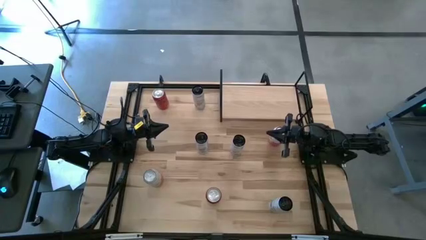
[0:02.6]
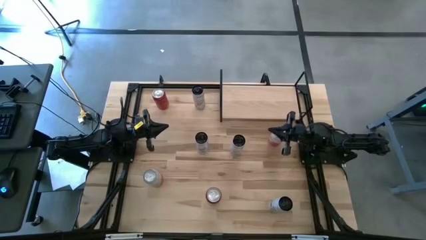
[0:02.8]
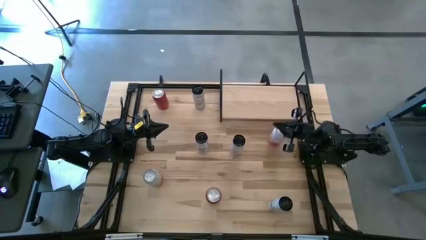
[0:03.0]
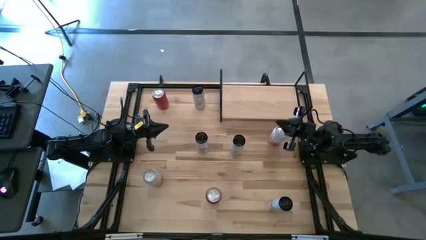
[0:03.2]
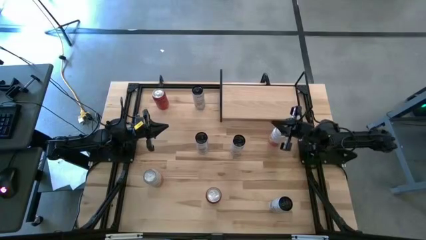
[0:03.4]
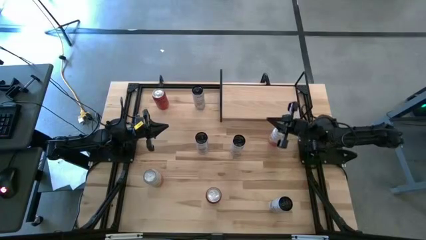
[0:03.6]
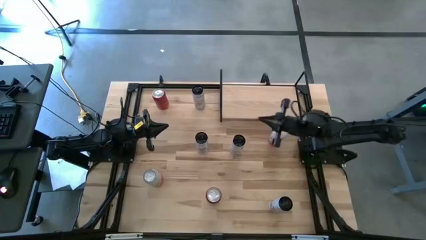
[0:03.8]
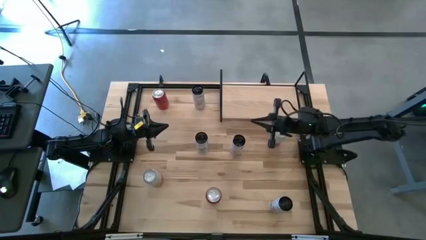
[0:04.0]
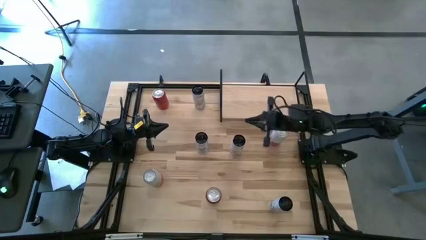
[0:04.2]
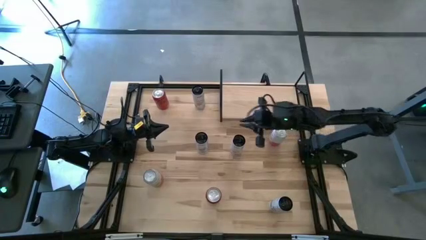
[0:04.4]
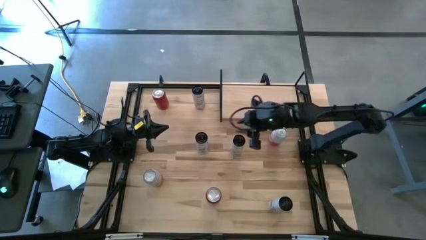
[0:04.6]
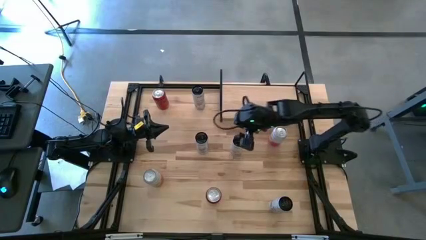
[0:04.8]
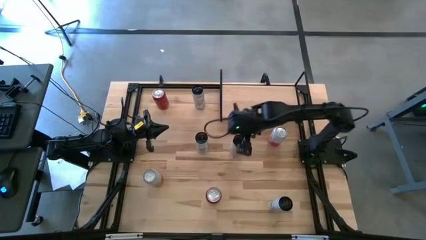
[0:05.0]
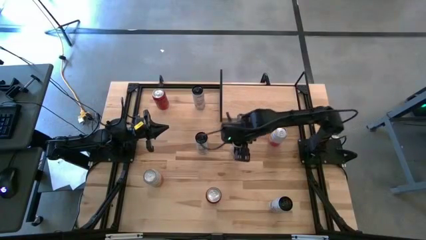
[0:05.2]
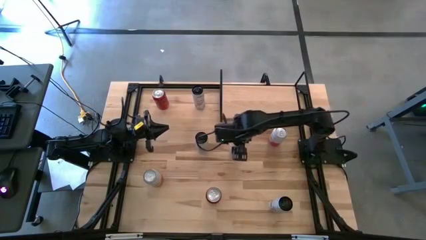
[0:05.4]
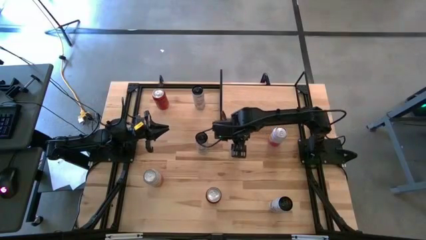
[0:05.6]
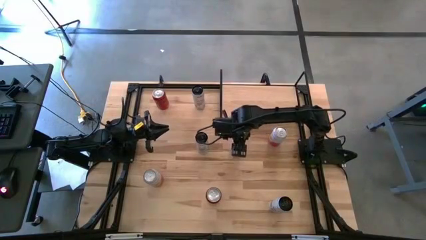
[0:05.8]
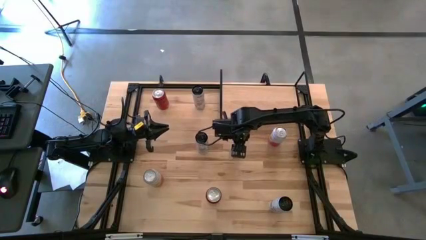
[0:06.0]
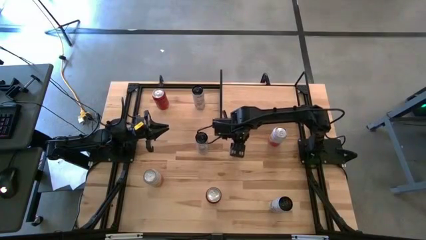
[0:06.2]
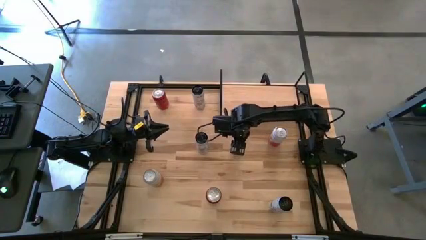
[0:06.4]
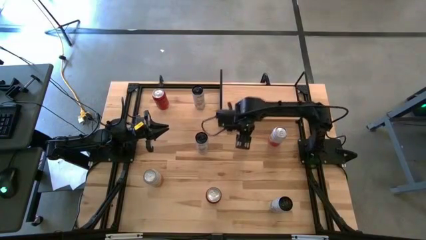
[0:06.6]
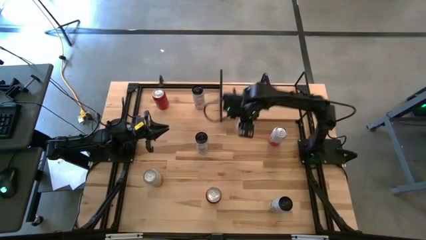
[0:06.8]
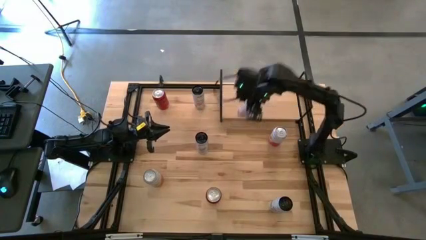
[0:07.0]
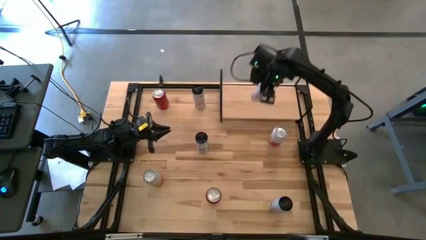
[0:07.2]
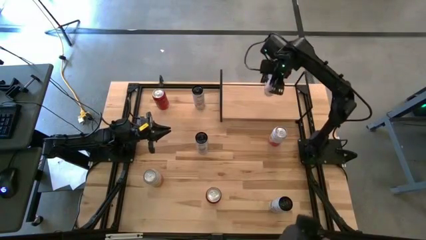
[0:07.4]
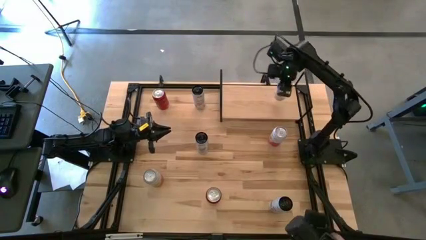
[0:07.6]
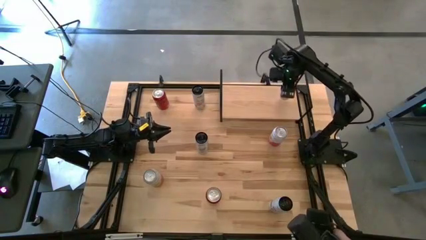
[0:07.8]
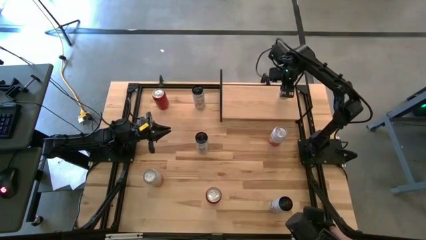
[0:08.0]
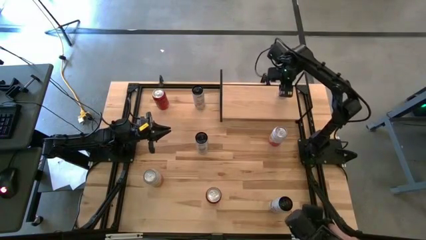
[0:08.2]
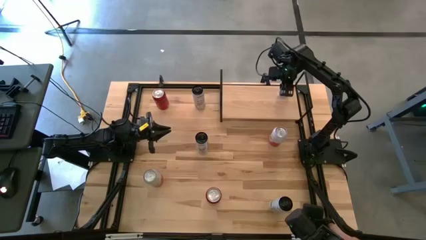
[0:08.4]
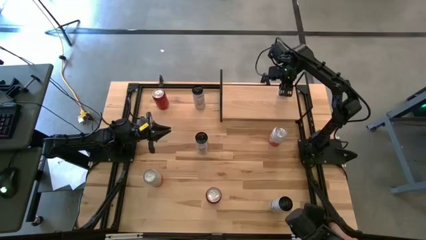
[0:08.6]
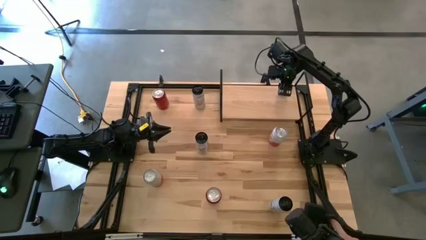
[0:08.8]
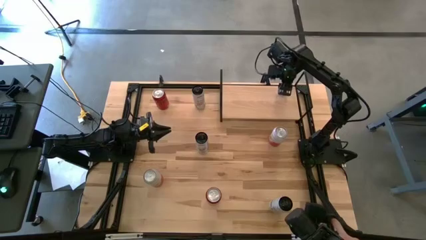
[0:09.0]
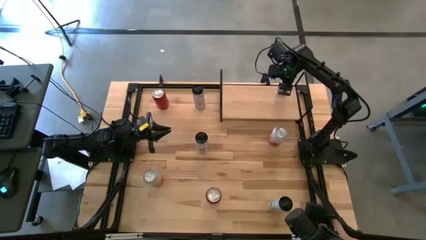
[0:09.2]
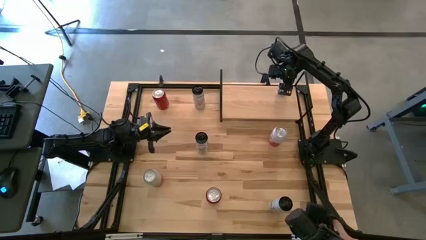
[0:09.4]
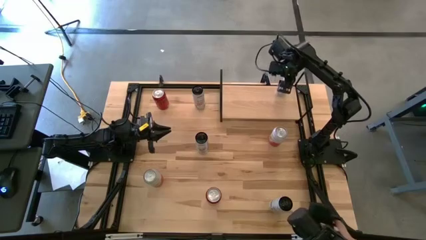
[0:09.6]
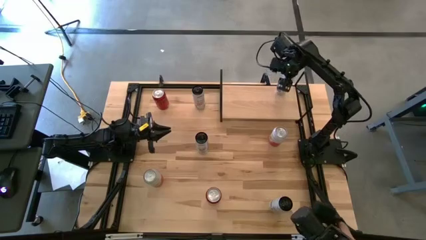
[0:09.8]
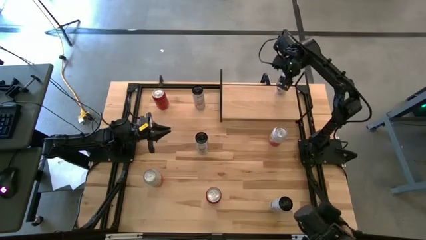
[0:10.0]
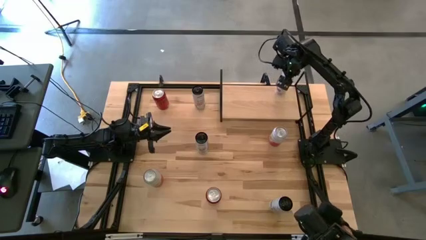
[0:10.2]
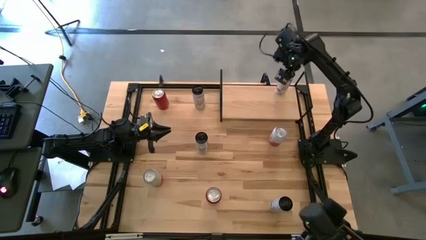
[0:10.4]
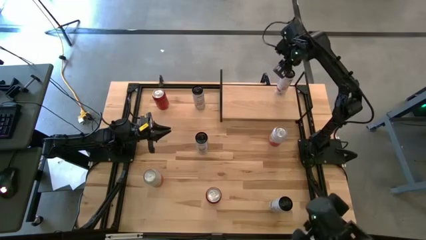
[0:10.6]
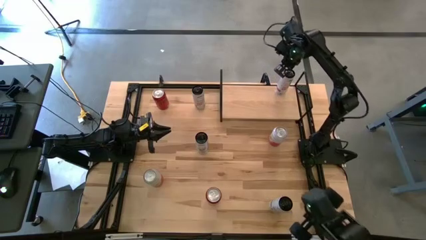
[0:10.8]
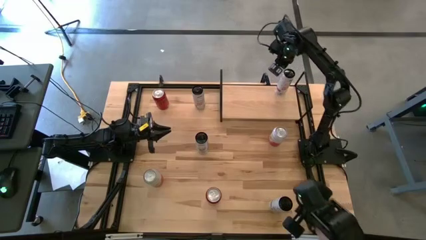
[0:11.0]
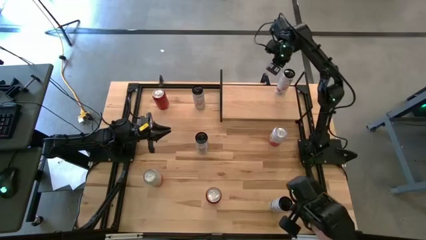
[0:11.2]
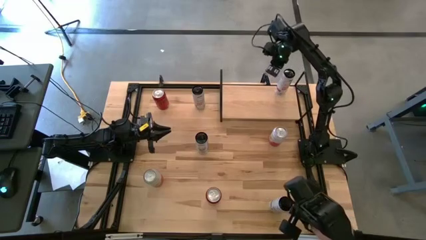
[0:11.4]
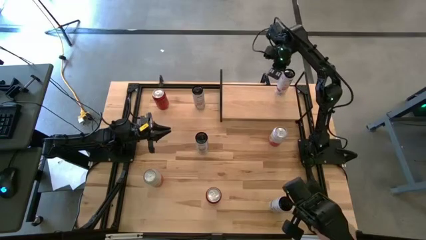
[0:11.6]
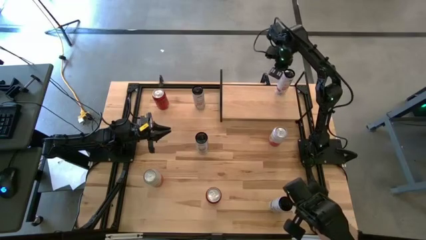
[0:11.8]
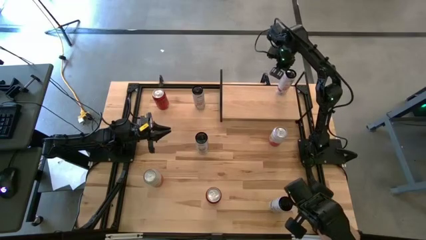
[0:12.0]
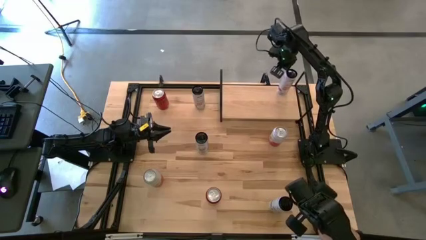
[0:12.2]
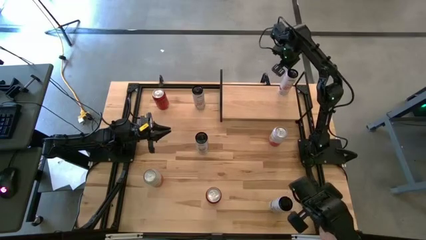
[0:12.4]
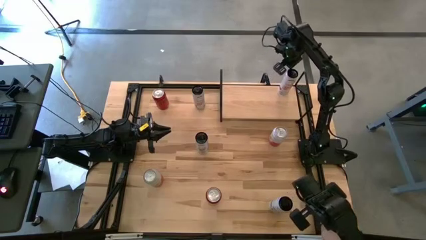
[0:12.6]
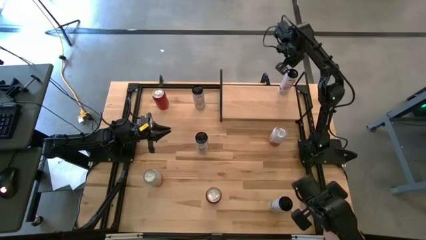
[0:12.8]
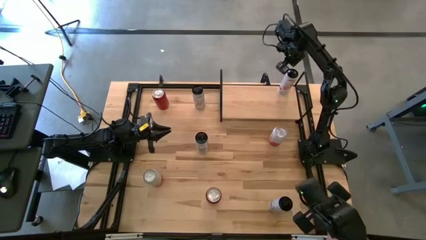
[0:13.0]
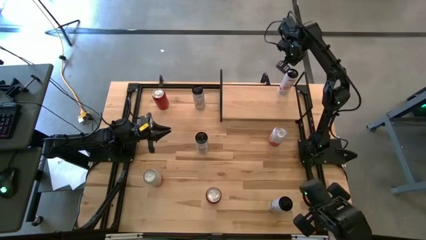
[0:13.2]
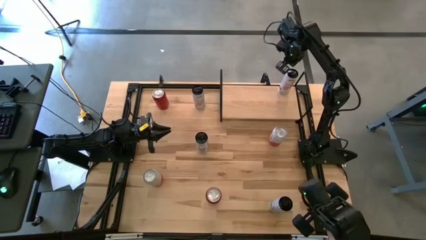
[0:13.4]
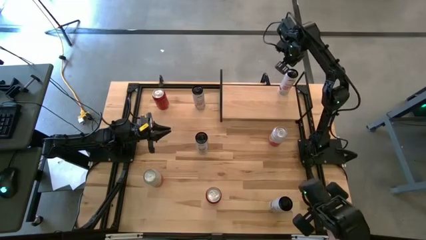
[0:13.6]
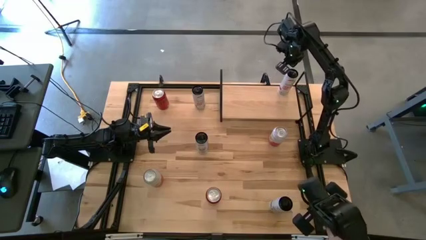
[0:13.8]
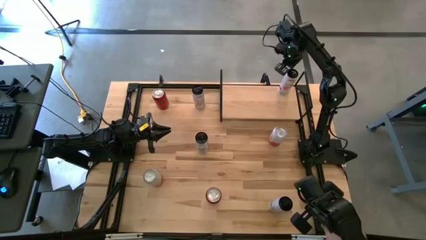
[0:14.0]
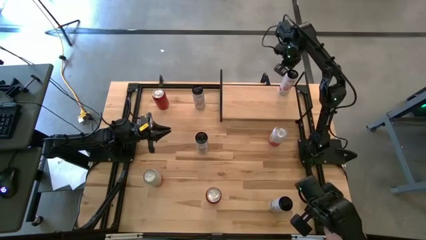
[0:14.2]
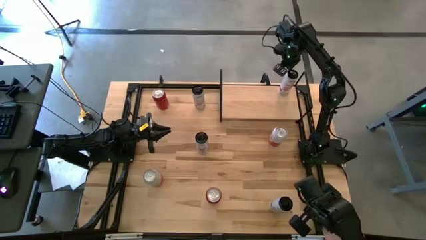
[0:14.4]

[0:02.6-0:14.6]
Task: Place canned beverage on shelf
Put the bottom white and pink soda can on the shelf
